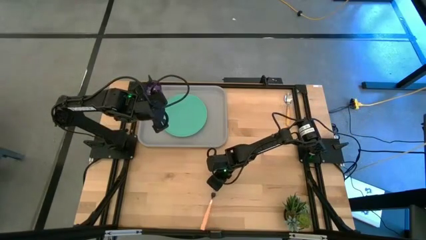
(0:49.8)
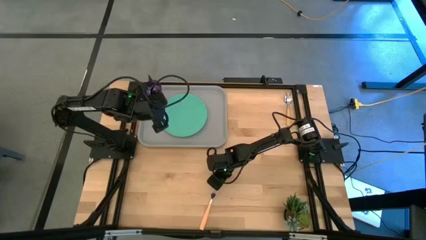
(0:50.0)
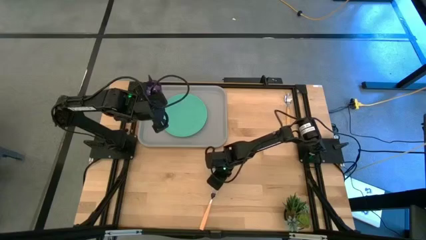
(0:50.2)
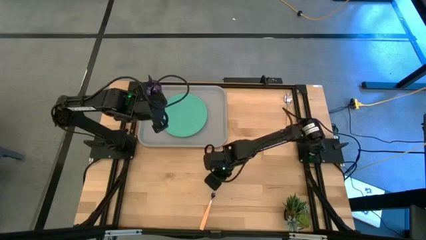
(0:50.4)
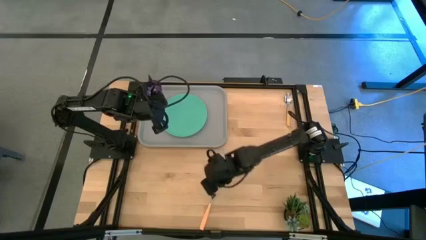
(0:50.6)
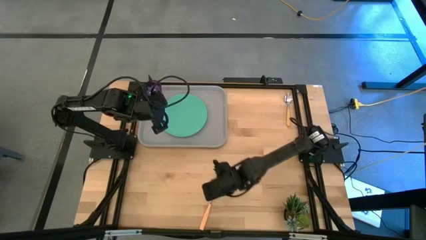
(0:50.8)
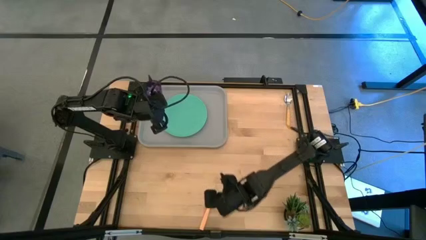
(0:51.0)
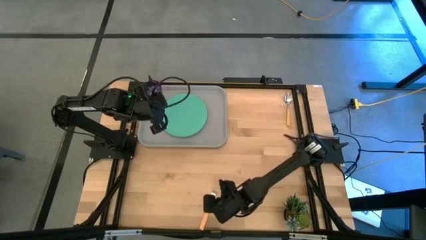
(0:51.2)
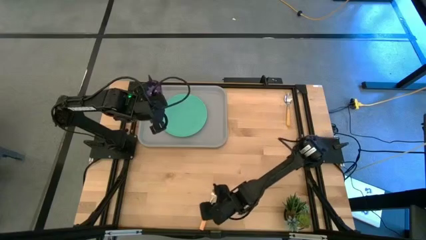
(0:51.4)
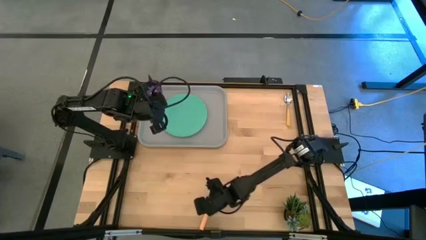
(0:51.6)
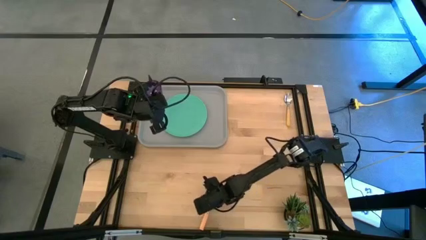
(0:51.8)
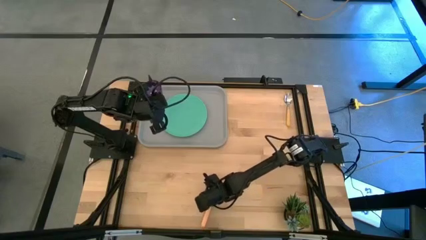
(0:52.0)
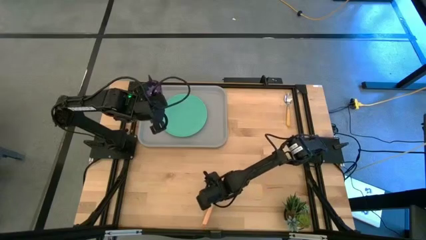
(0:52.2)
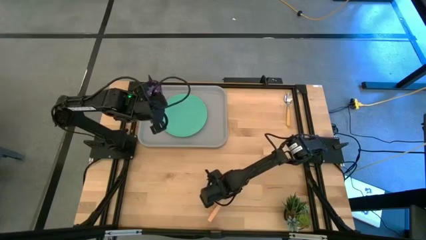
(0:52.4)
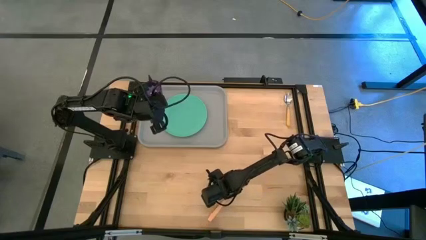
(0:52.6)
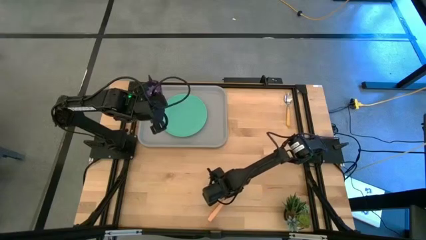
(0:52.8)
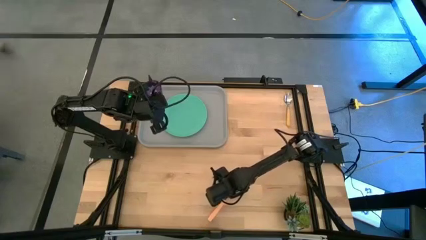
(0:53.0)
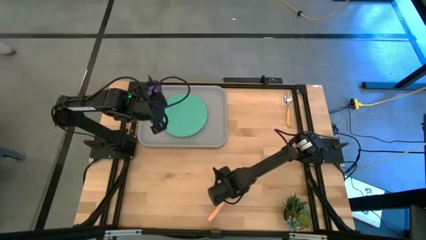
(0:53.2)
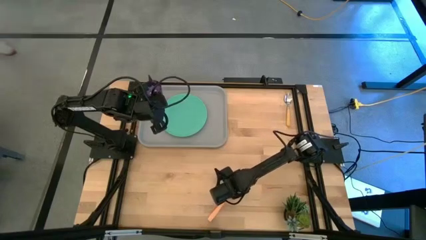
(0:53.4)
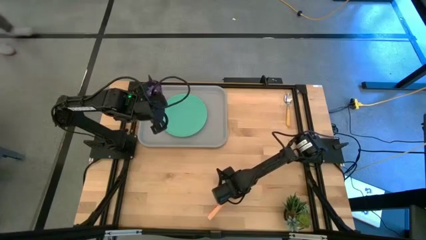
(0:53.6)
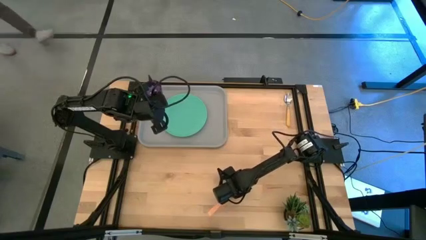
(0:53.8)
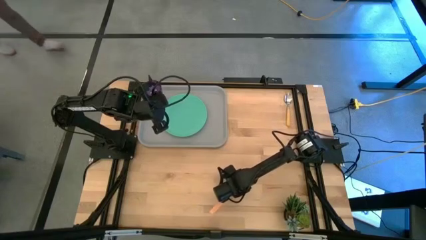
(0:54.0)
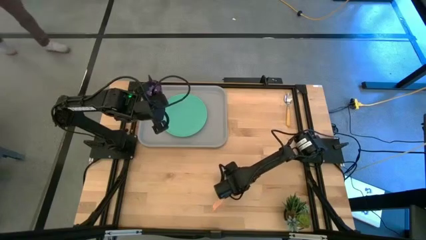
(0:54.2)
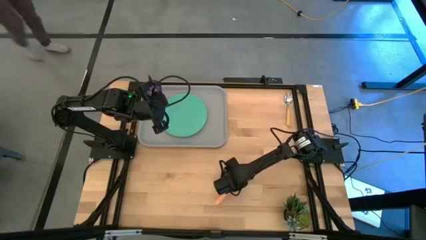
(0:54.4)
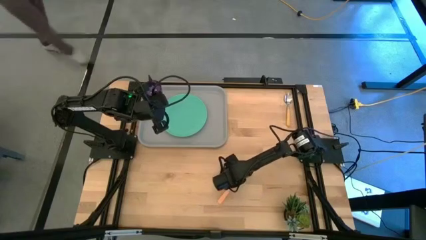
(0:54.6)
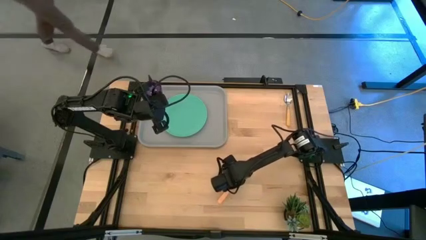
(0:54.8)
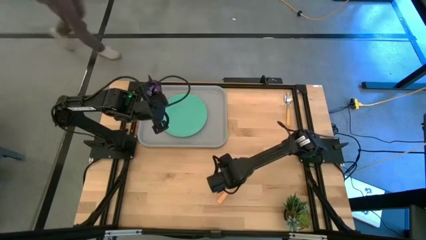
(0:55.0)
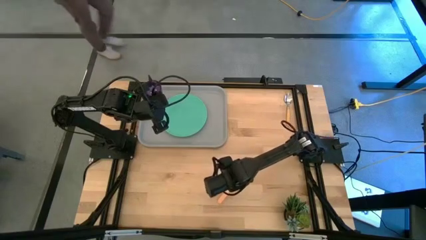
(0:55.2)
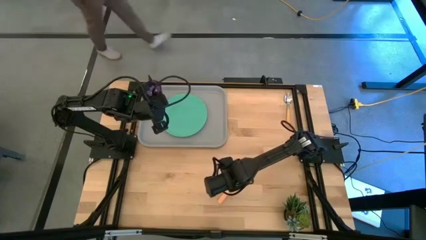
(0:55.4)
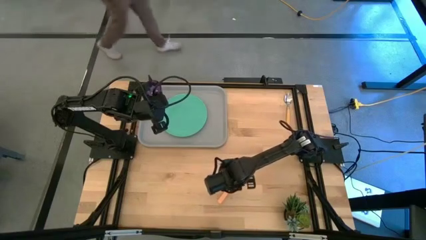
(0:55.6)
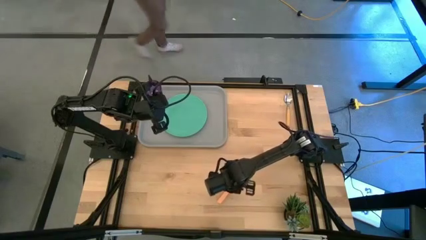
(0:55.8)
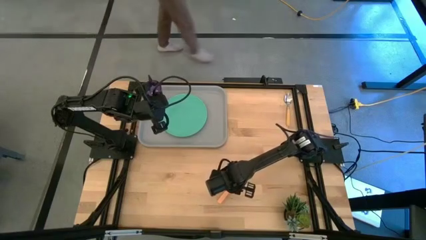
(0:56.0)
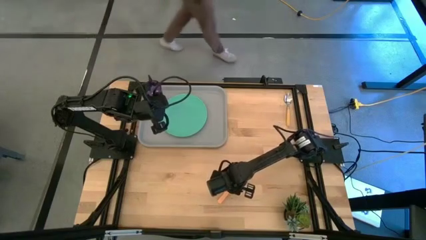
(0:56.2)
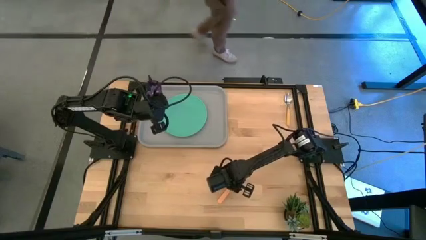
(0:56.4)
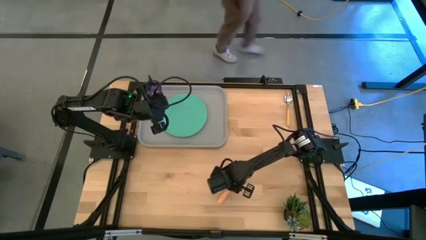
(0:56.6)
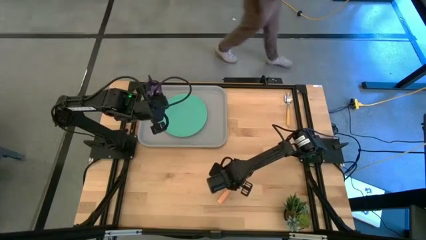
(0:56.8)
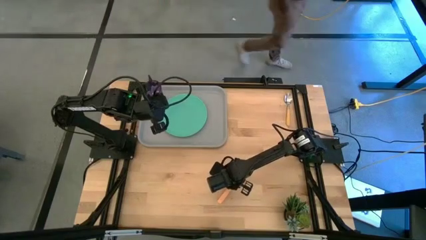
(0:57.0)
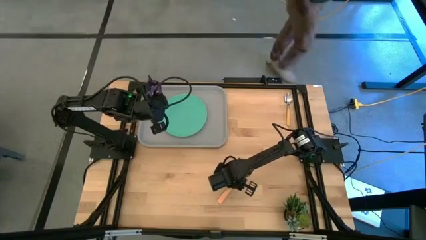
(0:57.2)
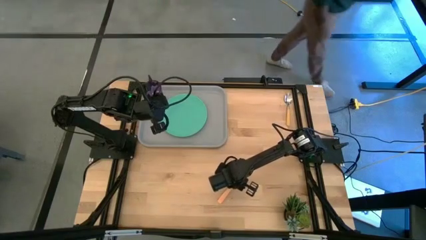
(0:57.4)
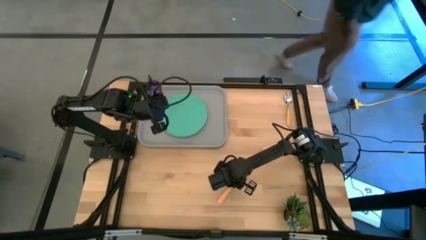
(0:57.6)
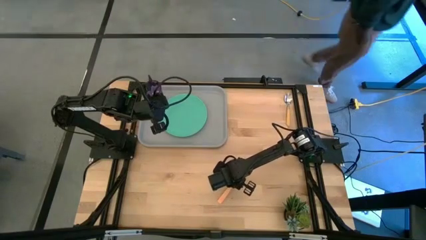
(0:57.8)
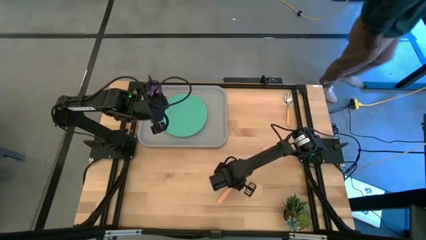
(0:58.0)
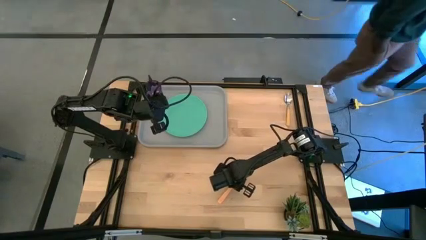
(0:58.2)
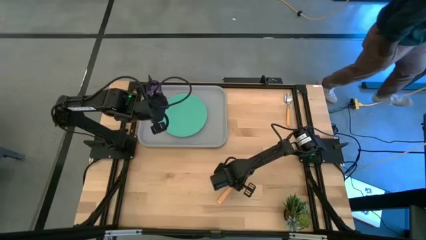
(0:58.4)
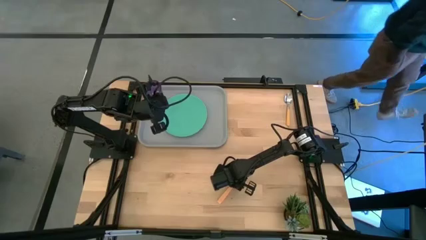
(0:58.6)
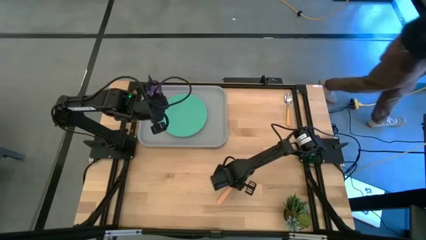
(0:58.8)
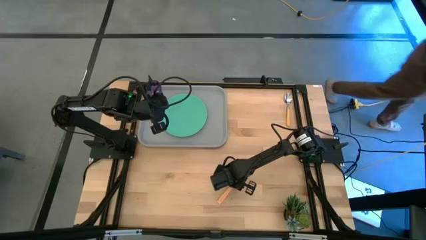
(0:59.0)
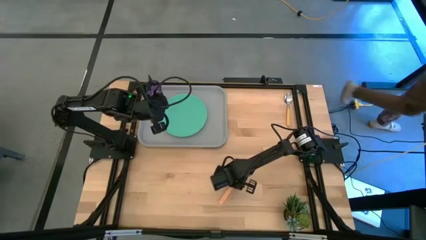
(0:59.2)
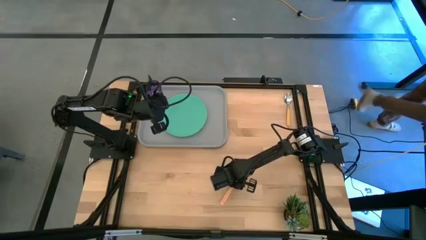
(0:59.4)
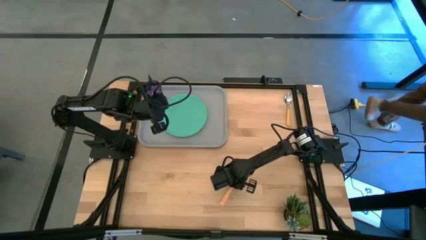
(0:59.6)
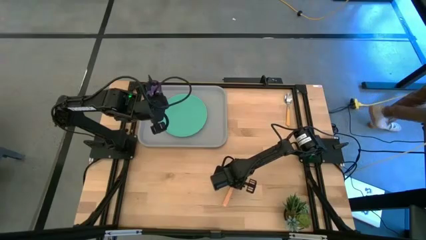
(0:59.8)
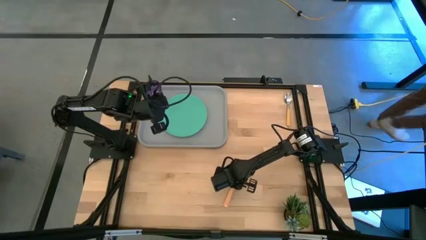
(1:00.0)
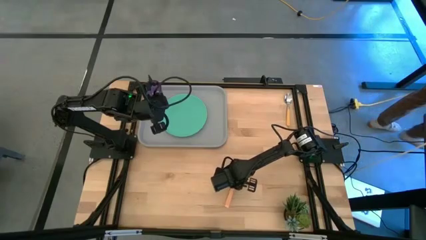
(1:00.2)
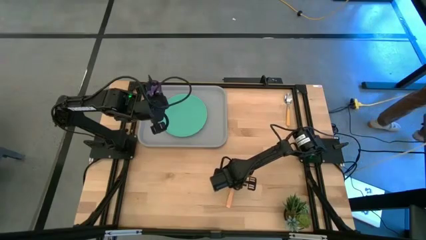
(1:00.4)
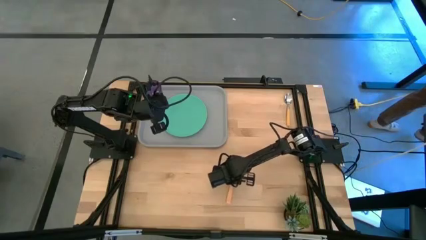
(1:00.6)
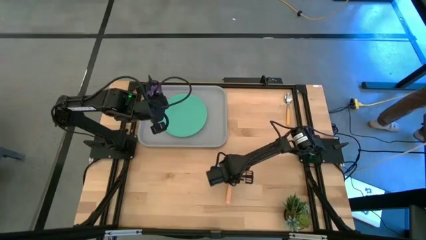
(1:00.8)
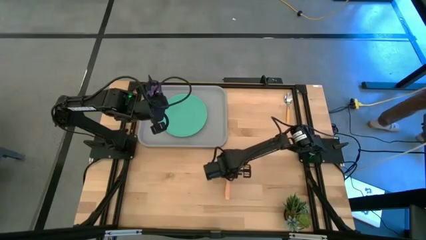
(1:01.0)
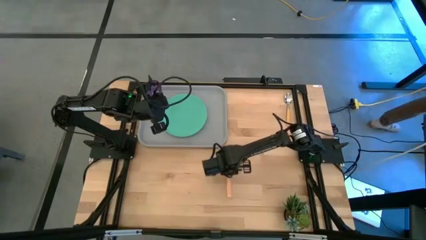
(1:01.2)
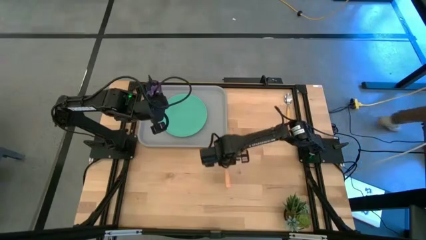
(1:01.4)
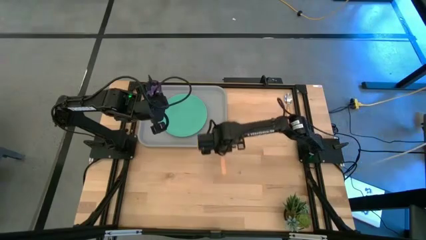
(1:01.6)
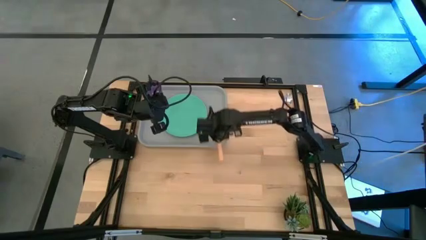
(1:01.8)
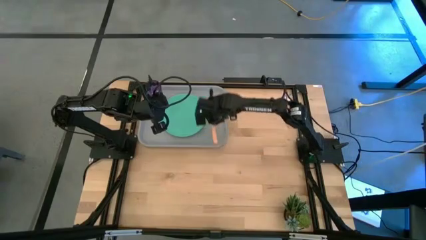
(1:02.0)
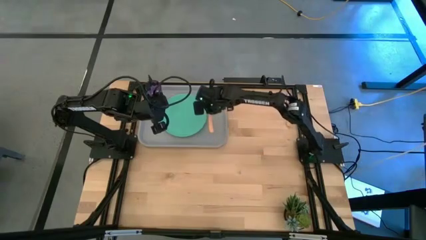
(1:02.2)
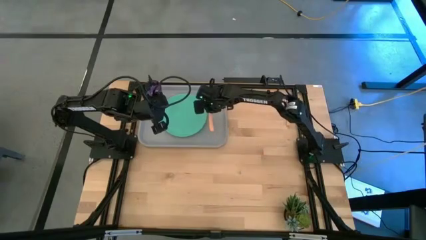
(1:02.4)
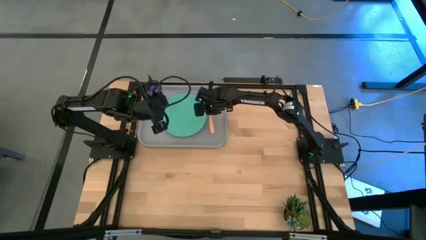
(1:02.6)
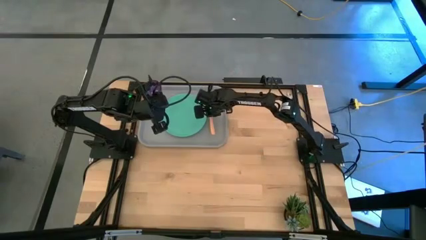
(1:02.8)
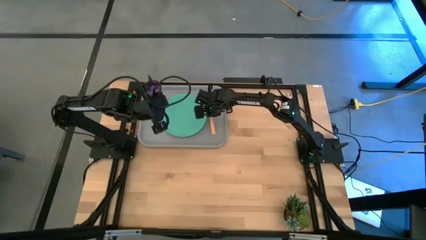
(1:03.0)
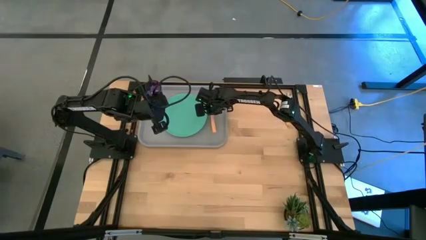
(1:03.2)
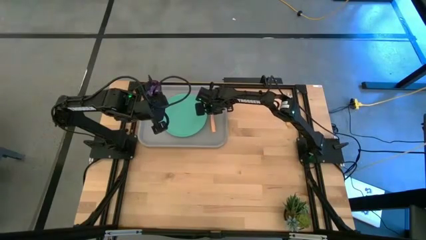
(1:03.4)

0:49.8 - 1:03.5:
Task: Pick and place plate/cup/fork/spoon on tray
Put the light orange fork on the right side of the green plate

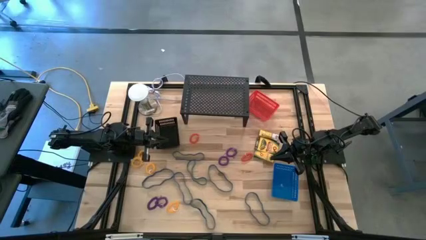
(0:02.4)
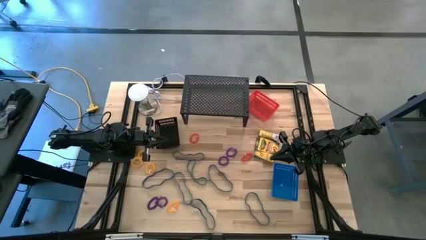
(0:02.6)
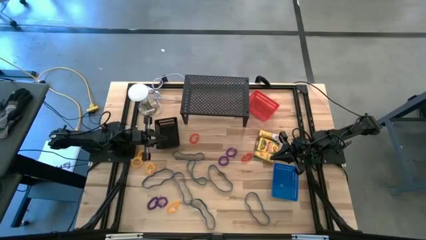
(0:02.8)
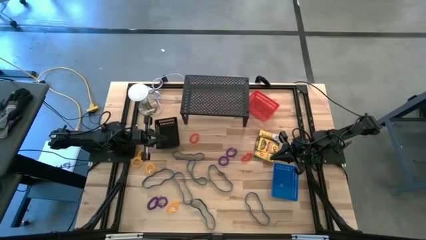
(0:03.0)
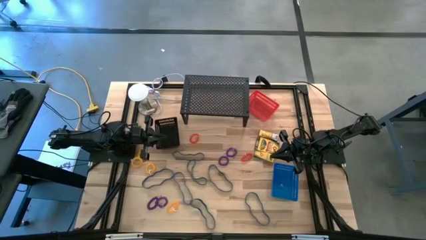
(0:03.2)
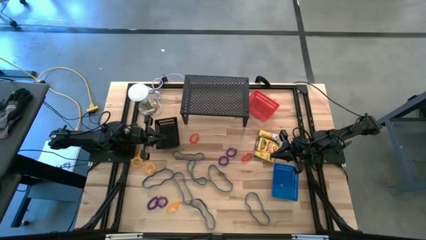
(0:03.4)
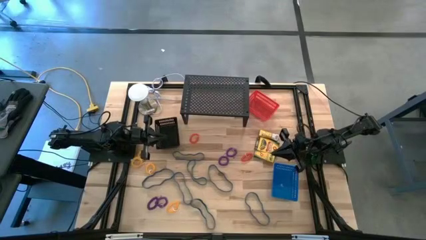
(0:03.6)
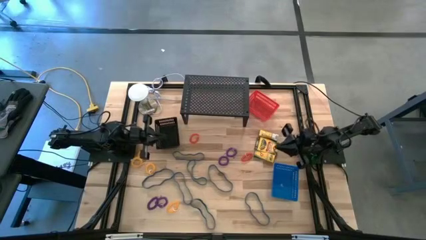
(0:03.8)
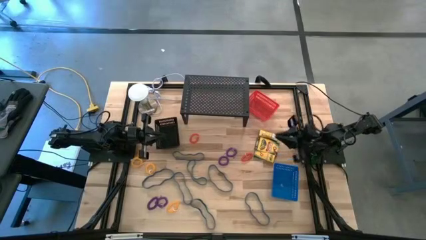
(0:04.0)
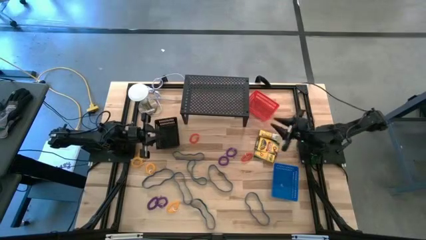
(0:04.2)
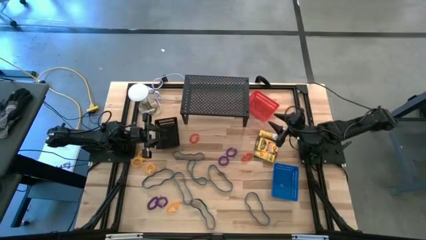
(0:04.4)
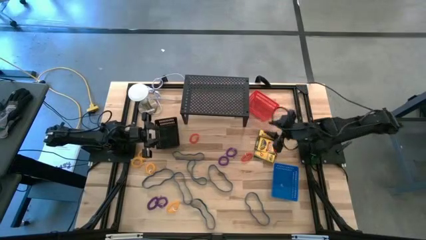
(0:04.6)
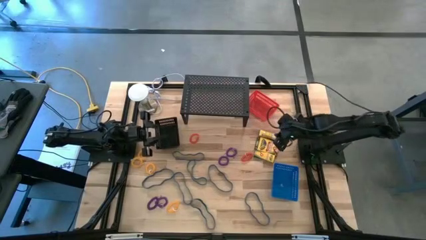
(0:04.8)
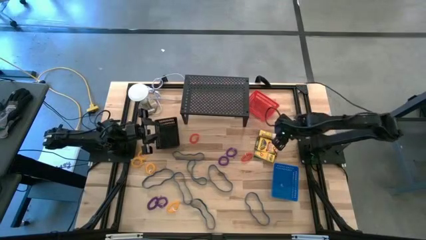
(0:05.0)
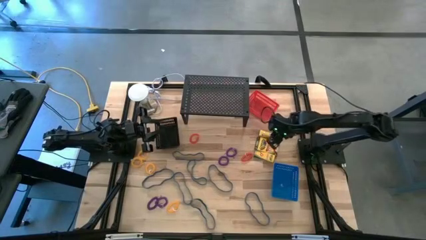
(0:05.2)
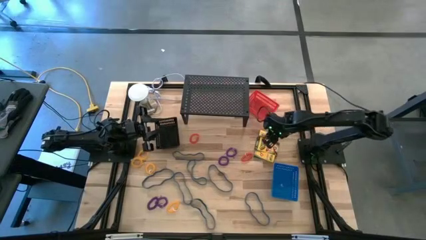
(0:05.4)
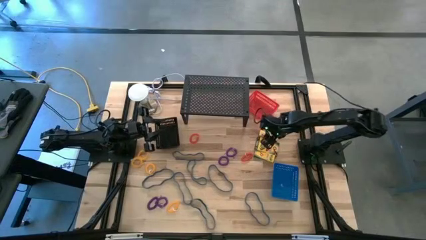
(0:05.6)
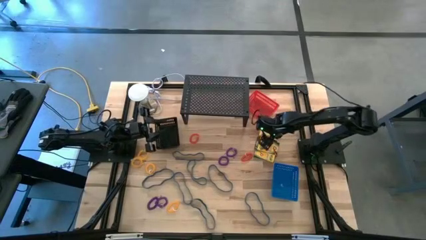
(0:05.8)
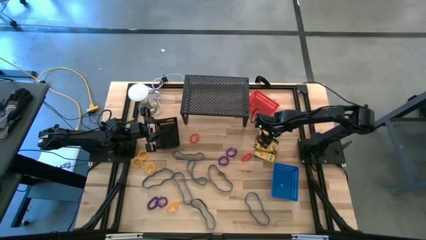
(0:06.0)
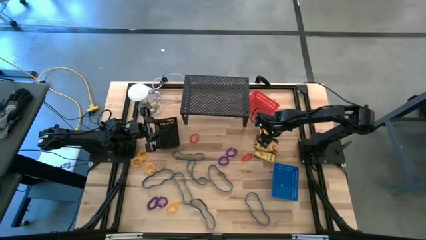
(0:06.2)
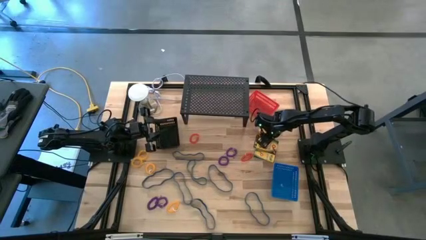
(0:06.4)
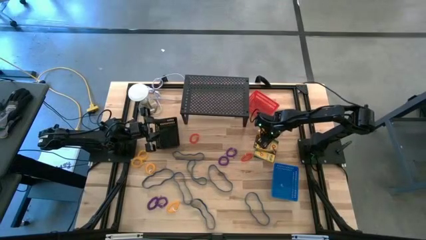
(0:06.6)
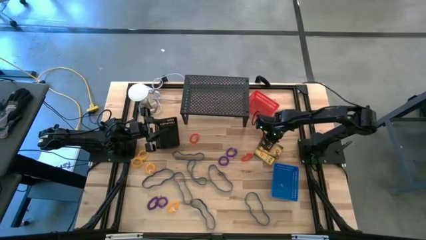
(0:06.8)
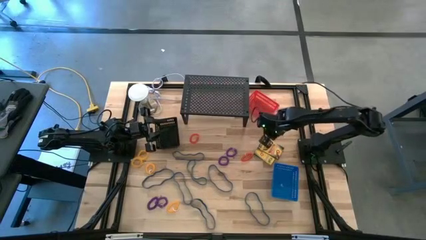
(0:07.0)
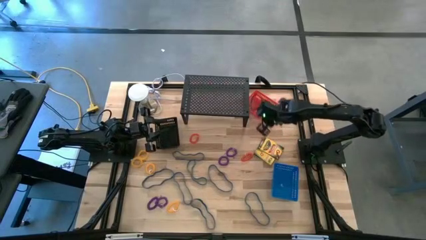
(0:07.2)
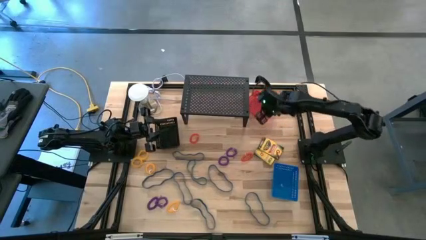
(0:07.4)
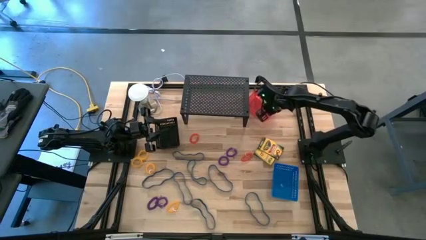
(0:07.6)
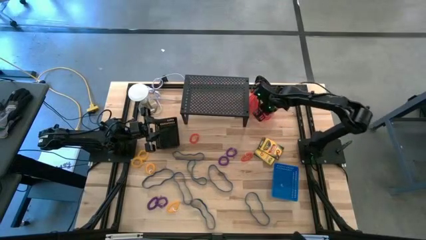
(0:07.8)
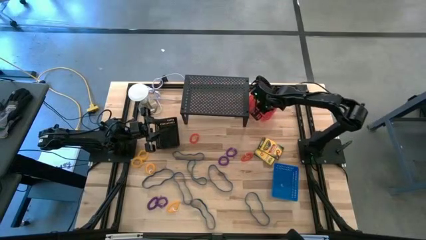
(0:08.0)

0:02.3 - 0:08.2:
Task: Pick & Place Office Desk Supplies
Put the small crayon box into the red basket
